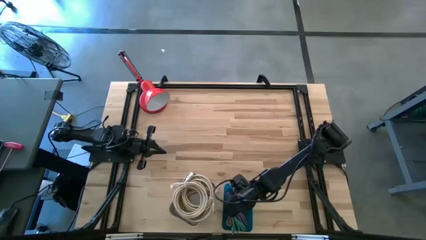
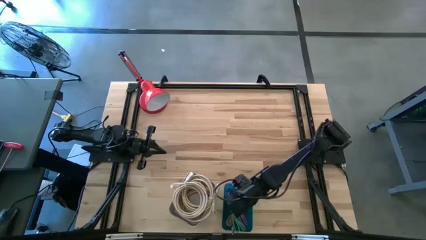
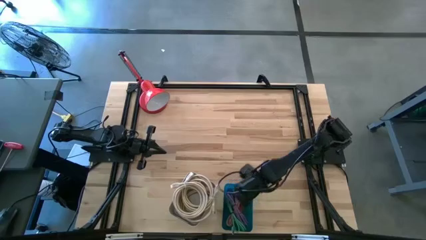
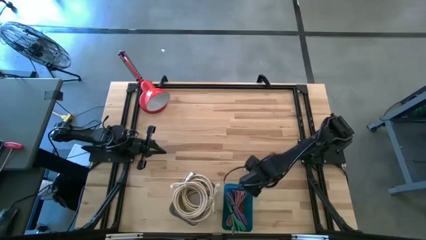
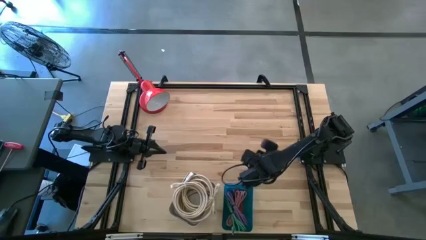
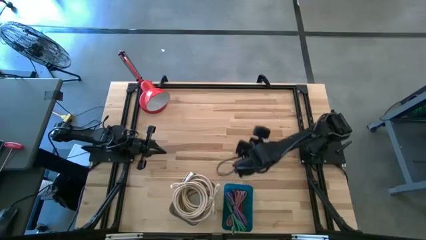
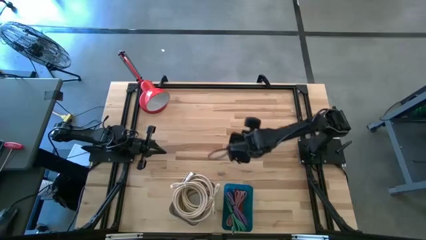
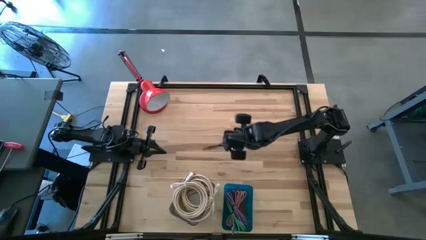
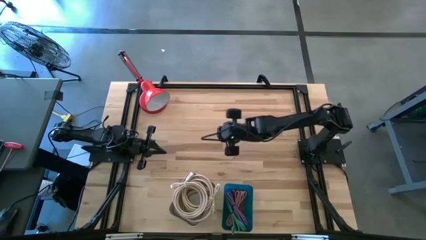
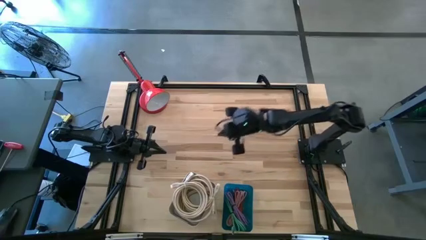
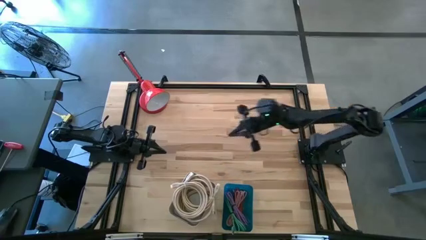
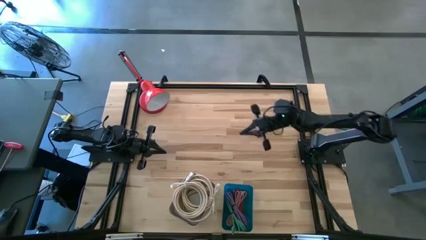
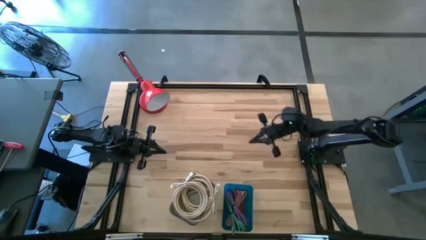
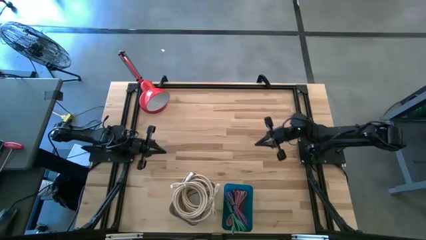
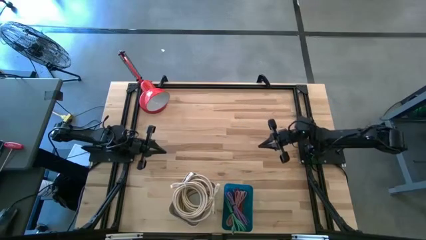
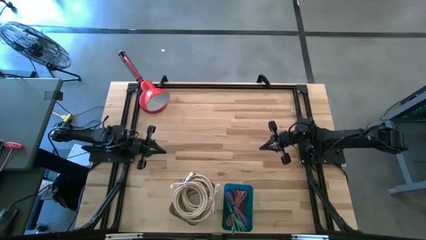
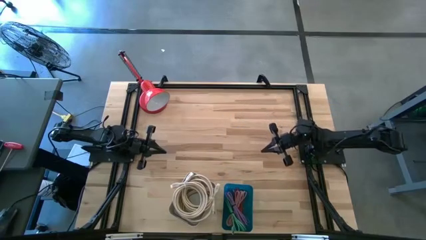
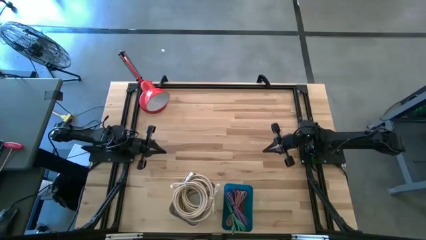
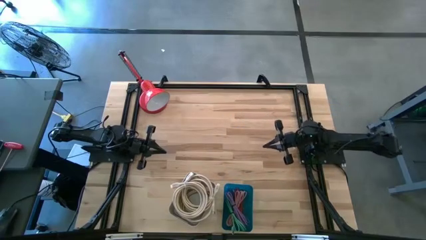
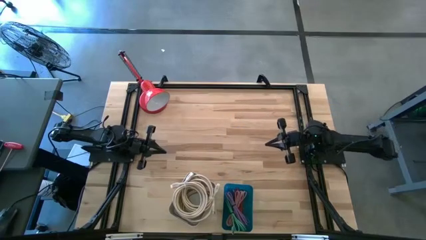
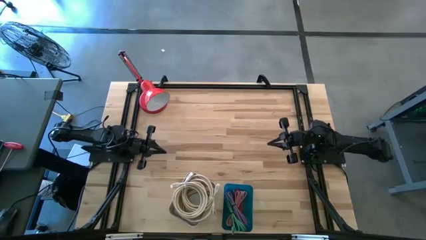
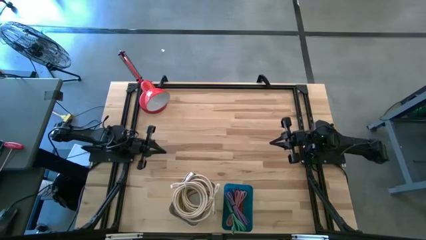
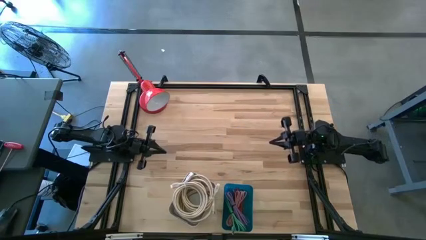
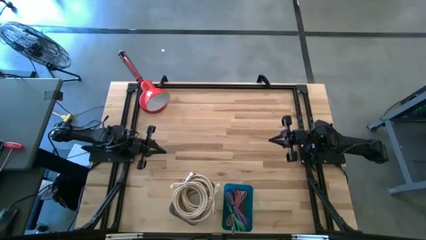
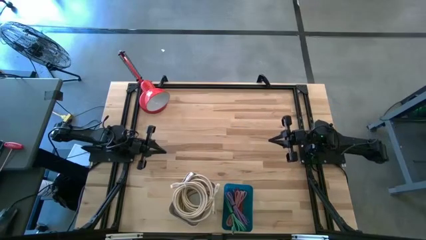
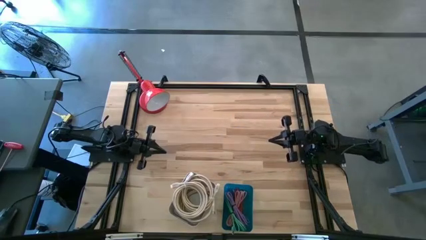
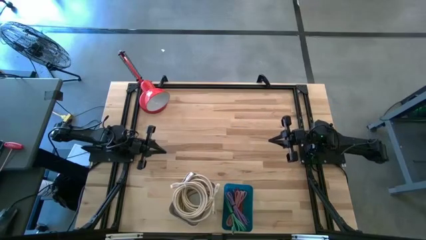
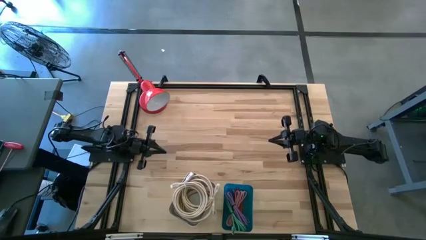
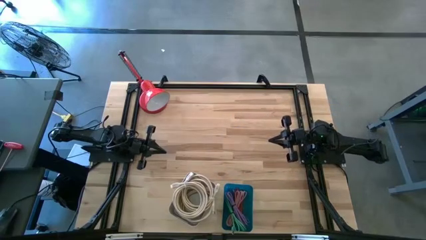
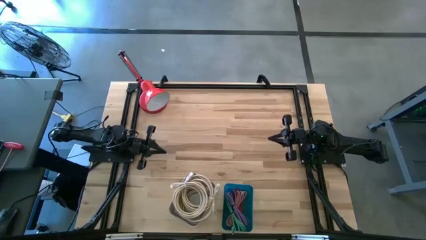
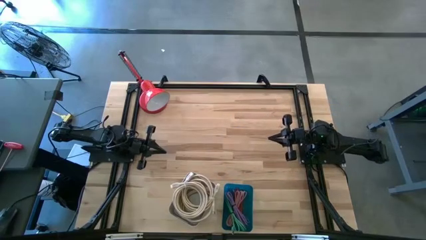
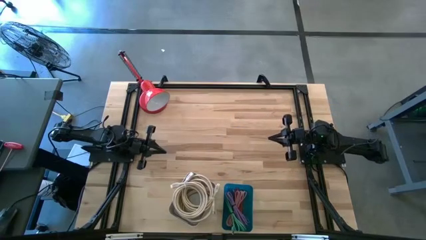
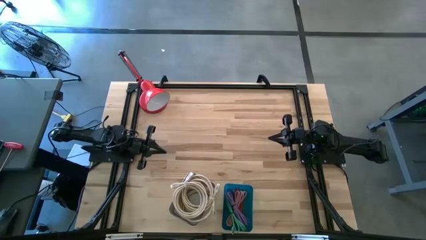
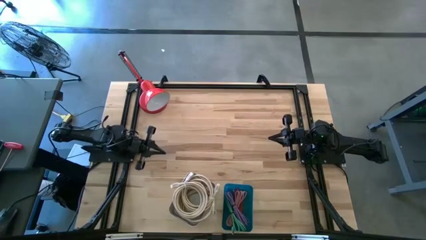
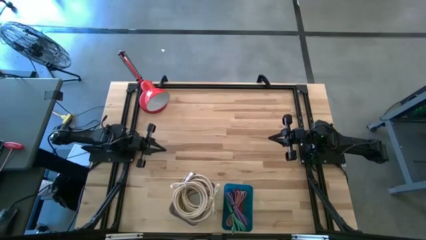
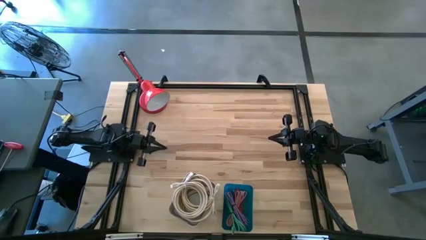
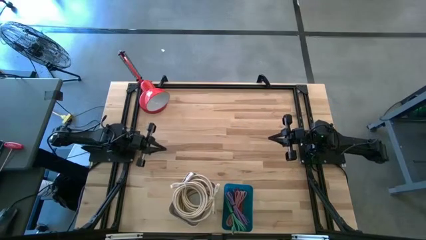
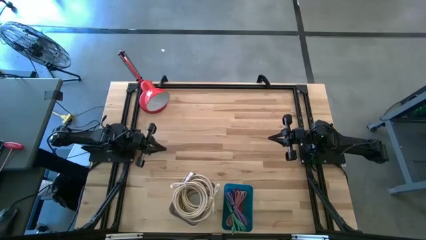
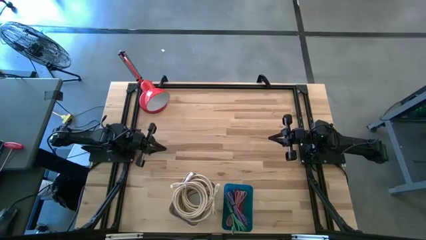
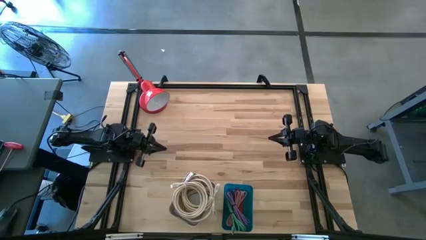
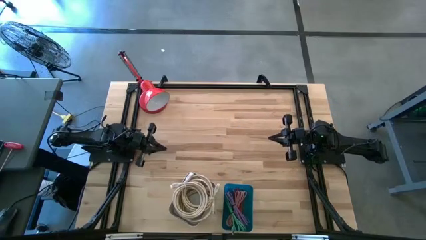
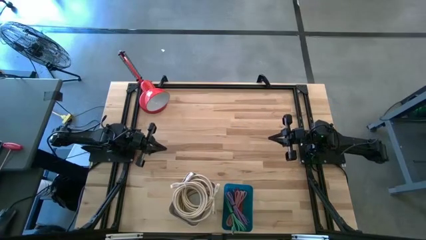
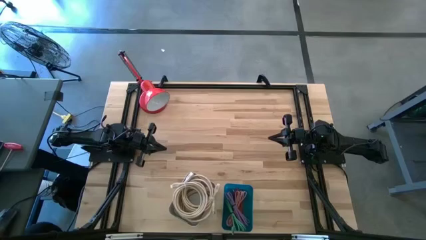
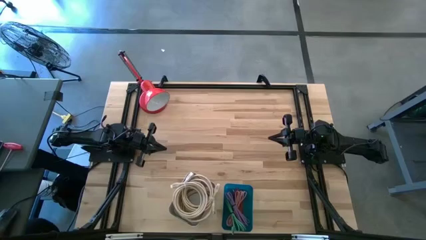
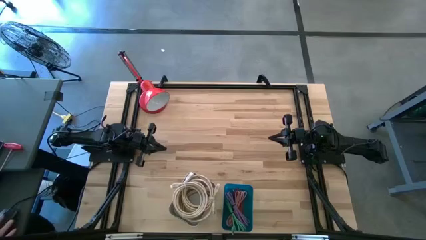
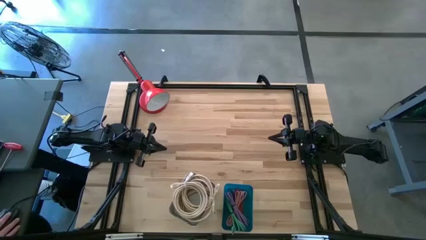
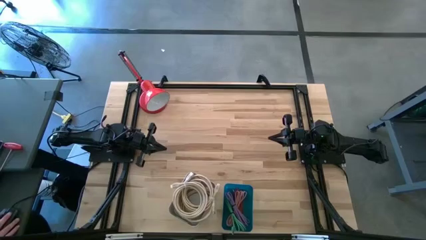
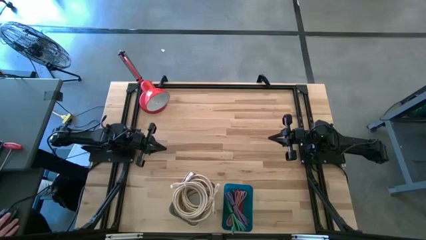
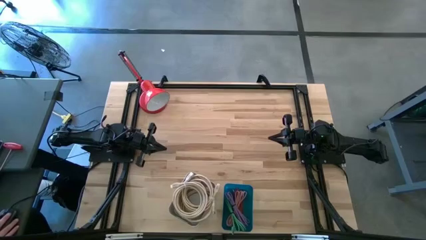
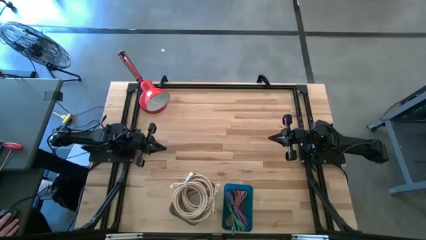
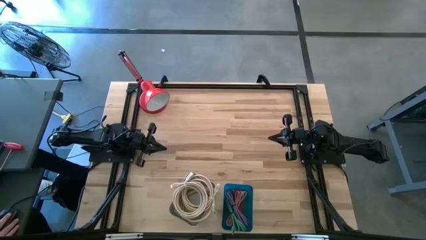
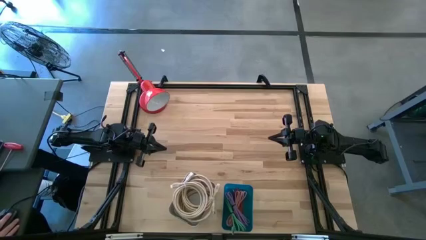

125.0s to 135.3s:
Task: Pick & Place USB Port
Return to Home Position

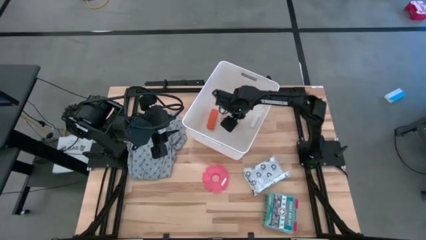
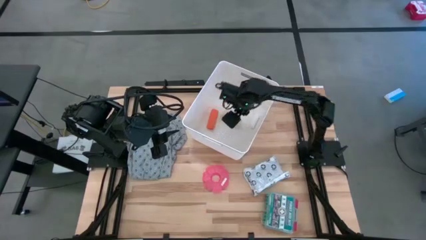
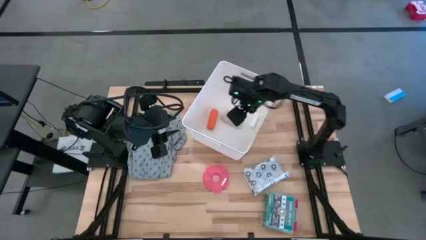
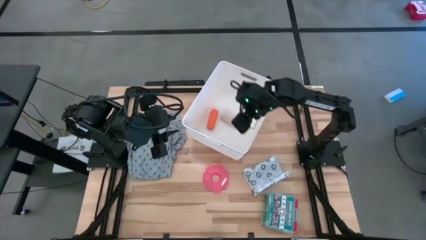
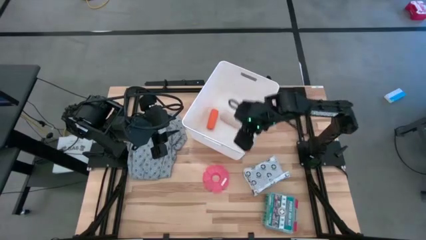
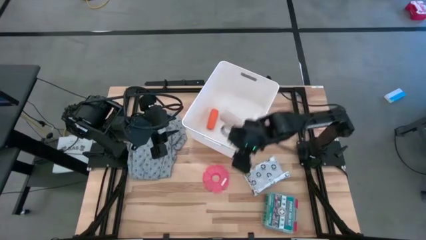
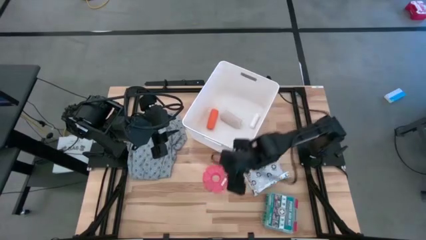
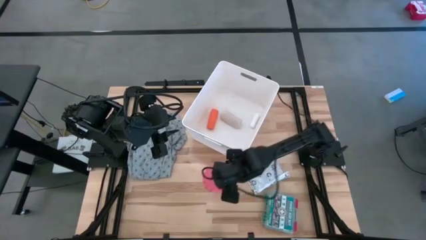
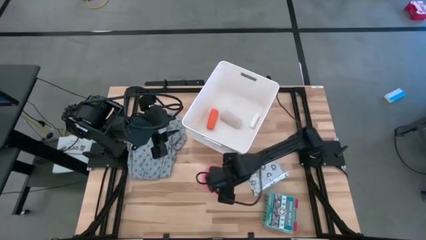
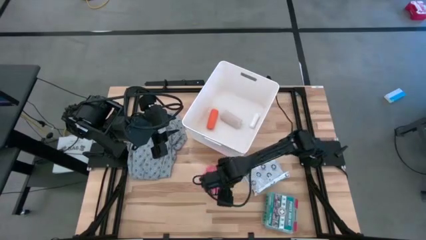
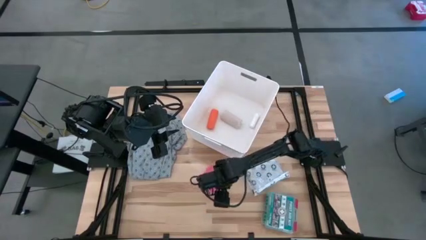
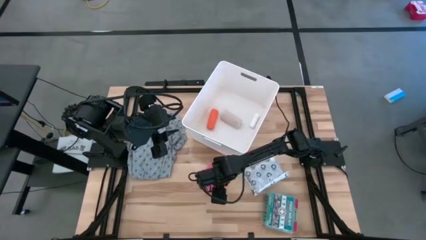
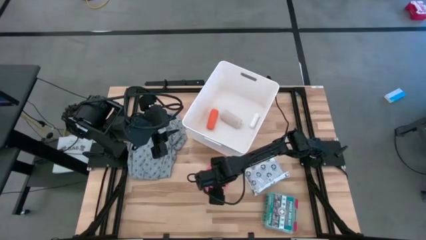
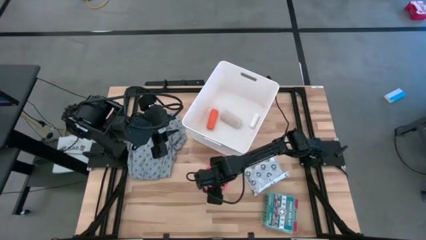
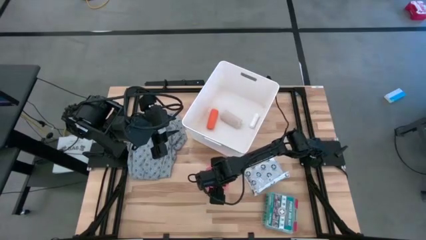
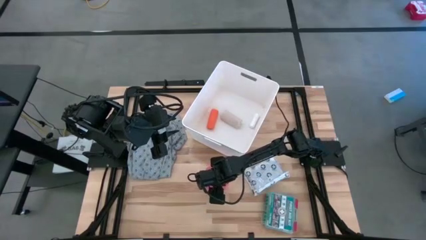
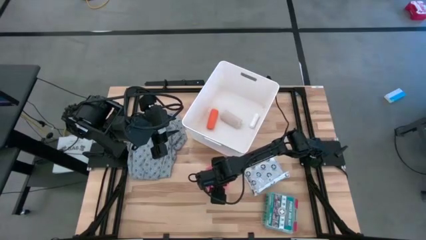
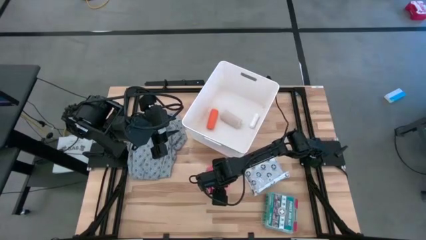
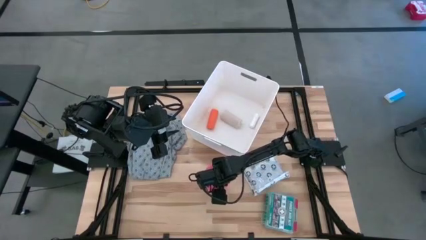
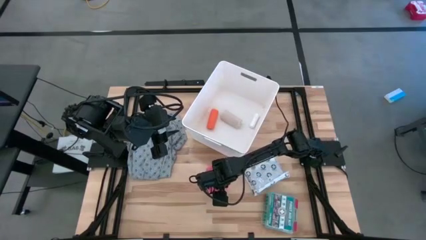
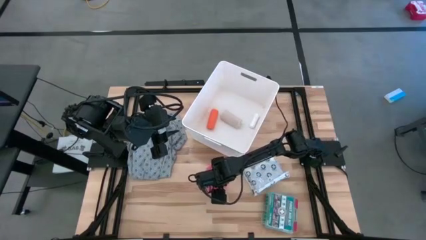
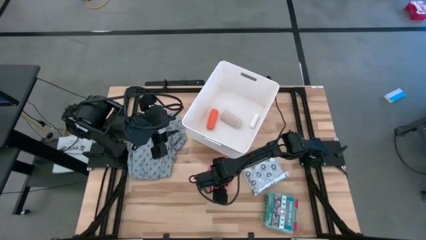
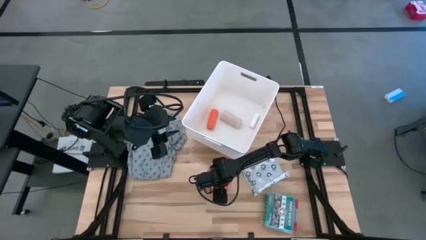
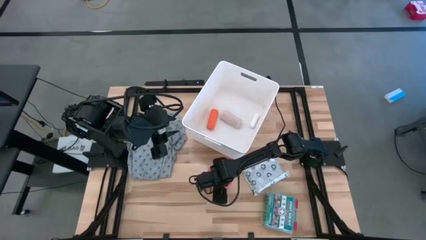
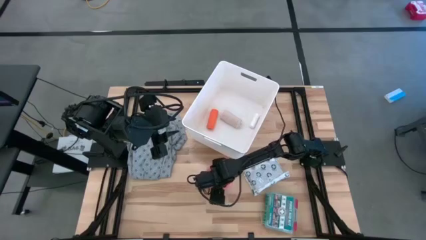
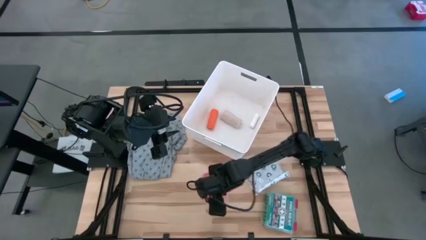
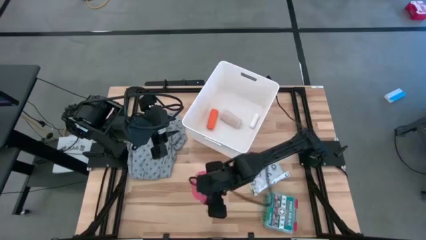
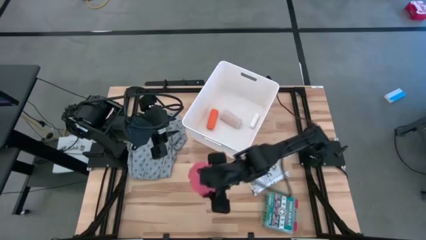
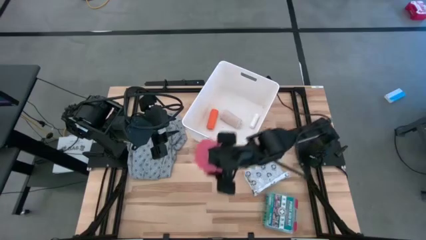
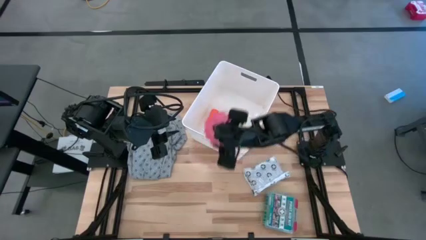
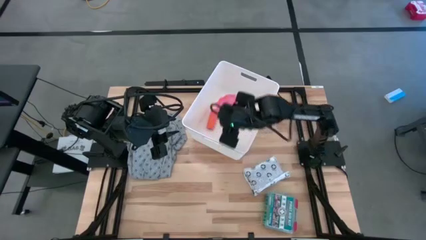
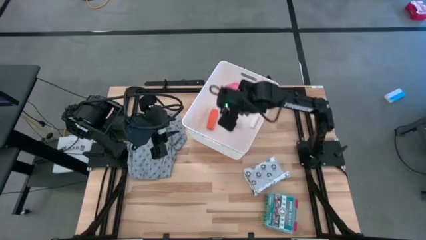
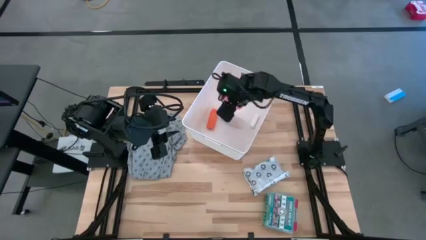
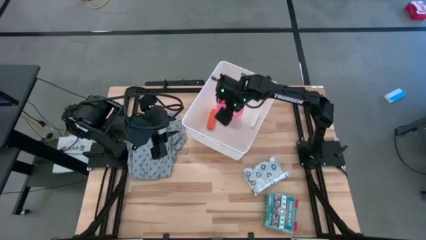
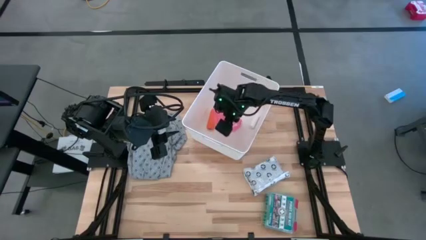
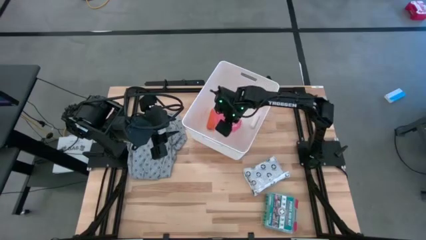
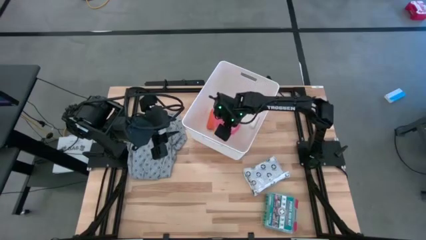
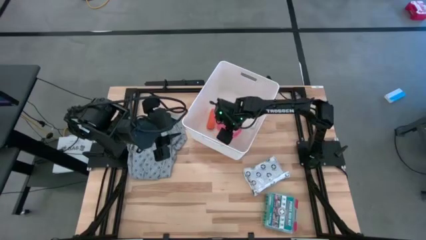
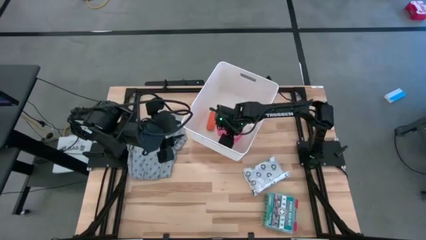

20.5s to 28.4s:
Task: Pick & place medical supplies in basket/bin
Put the pink medicine organizer into the white bin
